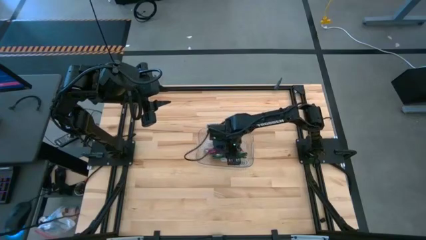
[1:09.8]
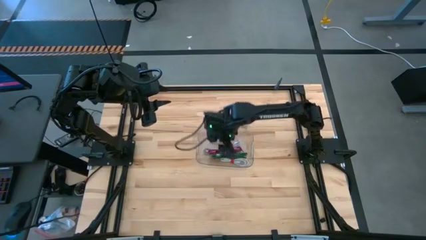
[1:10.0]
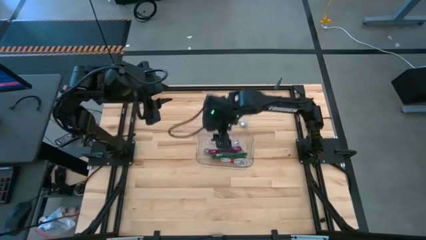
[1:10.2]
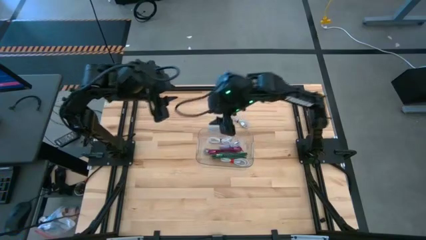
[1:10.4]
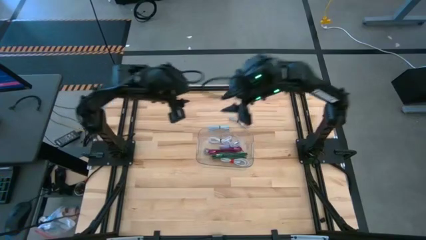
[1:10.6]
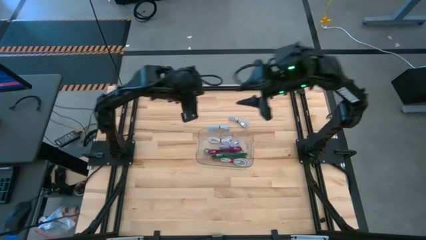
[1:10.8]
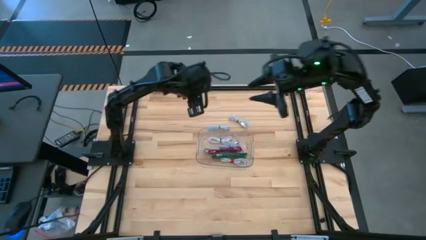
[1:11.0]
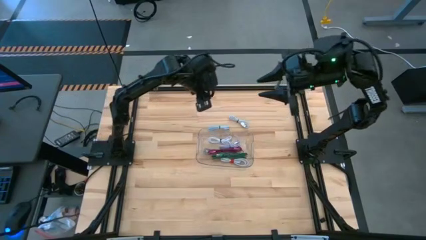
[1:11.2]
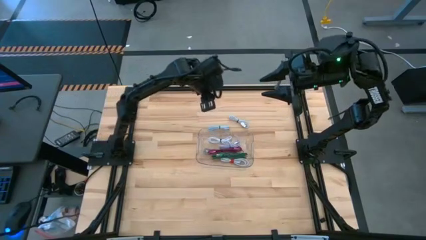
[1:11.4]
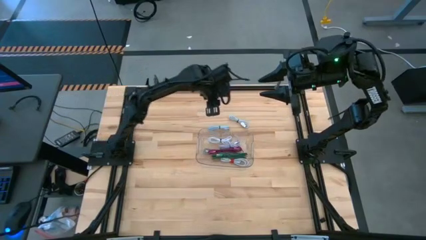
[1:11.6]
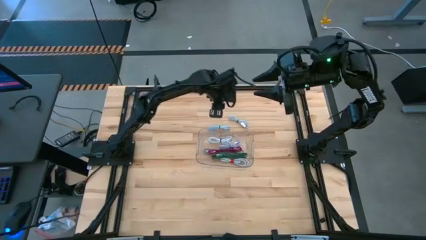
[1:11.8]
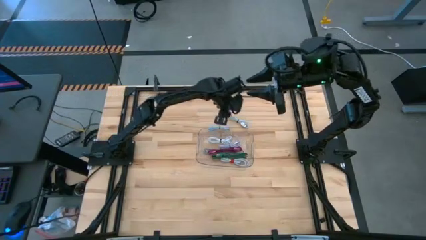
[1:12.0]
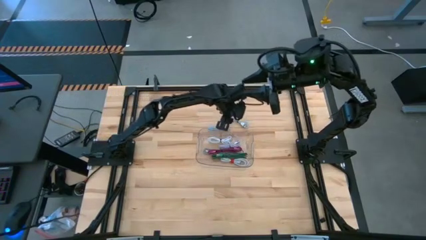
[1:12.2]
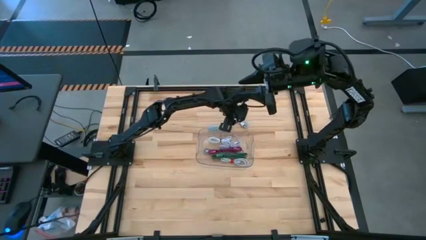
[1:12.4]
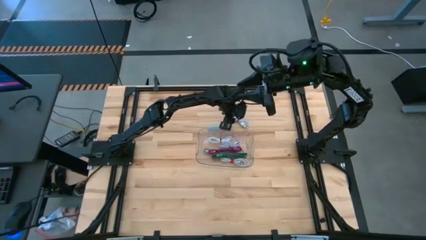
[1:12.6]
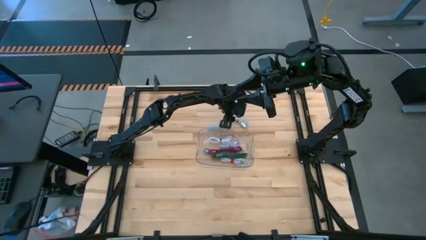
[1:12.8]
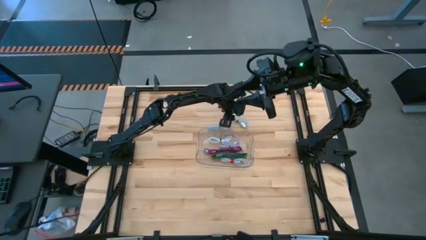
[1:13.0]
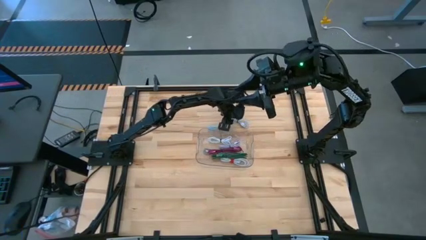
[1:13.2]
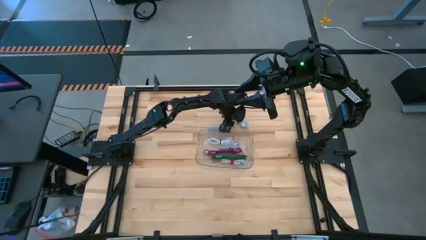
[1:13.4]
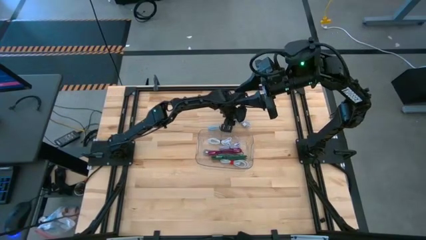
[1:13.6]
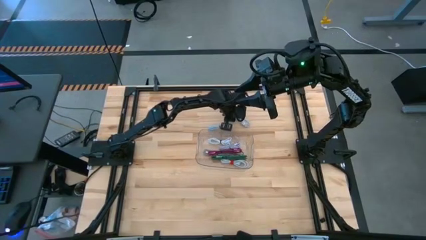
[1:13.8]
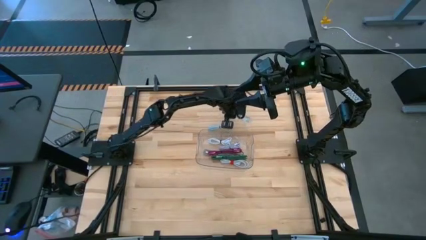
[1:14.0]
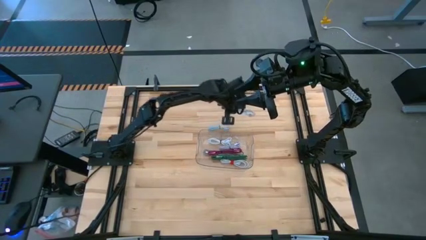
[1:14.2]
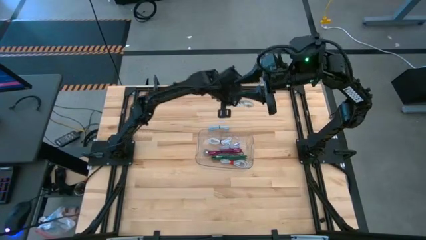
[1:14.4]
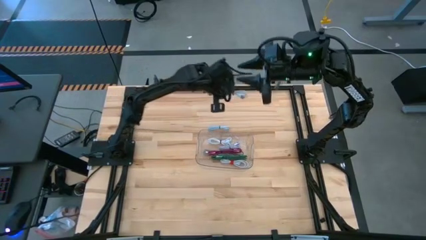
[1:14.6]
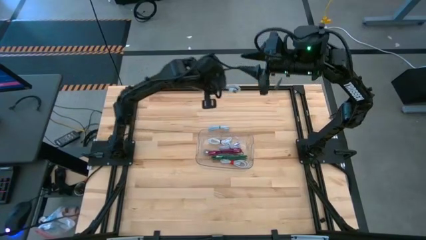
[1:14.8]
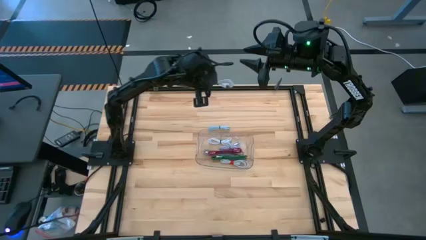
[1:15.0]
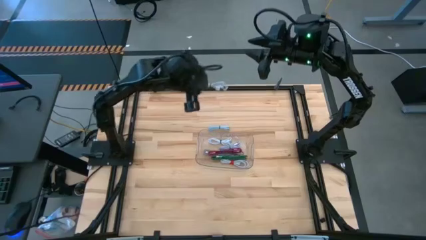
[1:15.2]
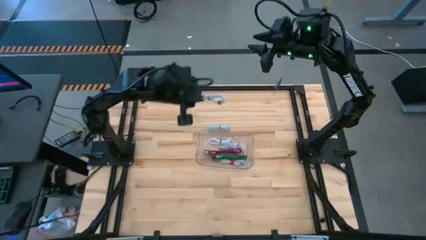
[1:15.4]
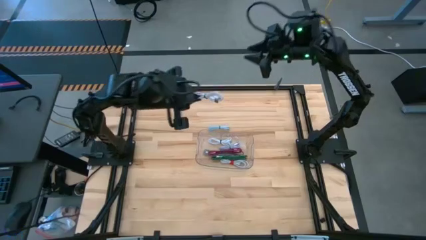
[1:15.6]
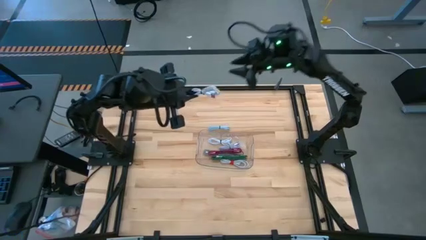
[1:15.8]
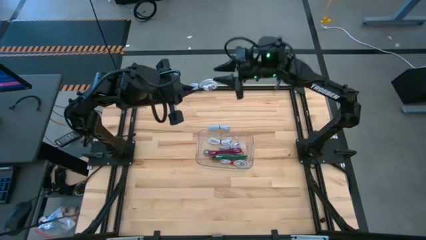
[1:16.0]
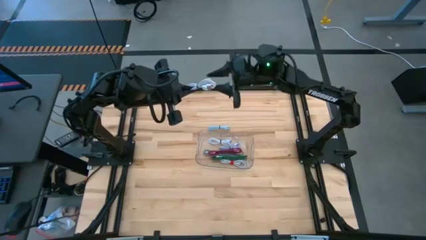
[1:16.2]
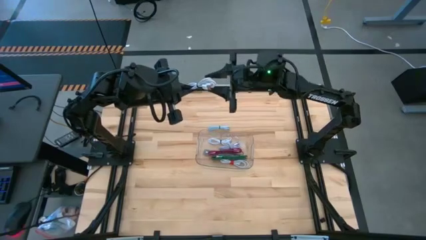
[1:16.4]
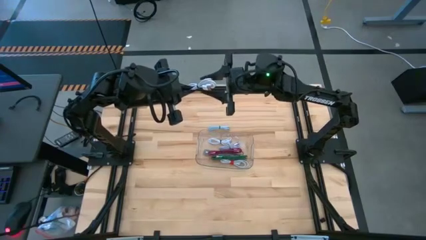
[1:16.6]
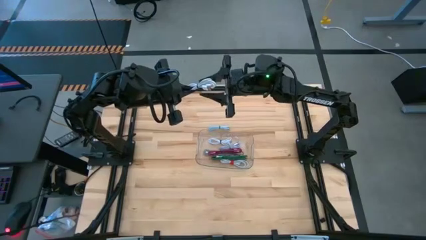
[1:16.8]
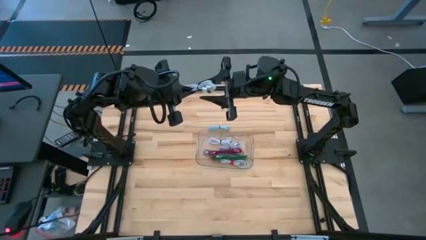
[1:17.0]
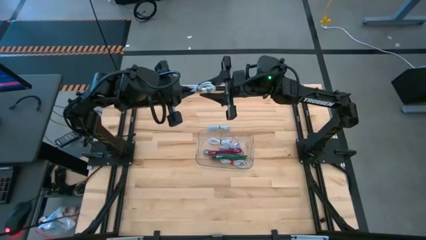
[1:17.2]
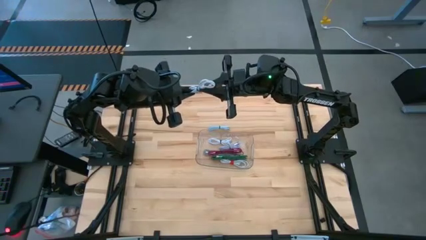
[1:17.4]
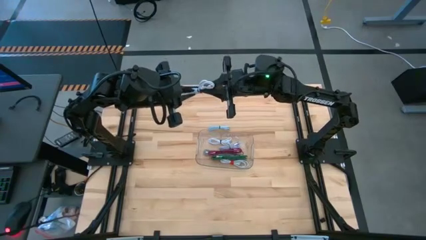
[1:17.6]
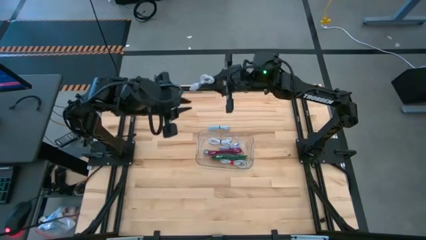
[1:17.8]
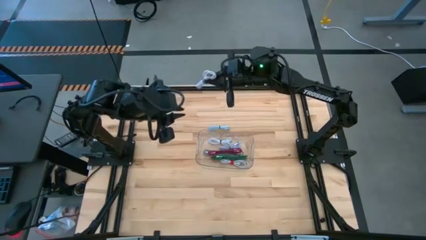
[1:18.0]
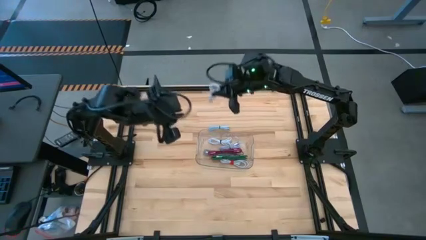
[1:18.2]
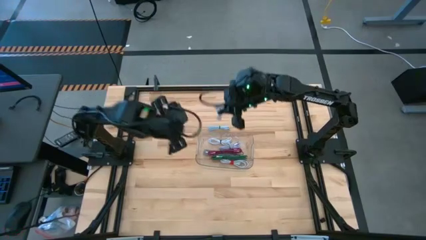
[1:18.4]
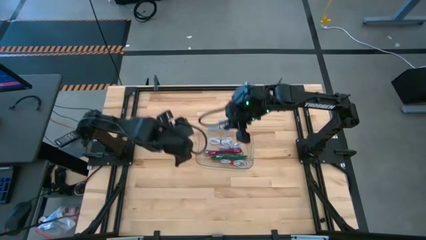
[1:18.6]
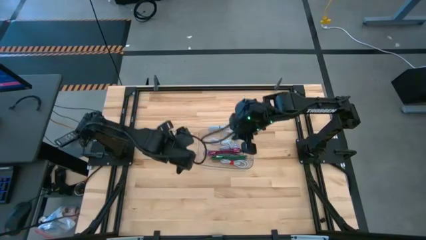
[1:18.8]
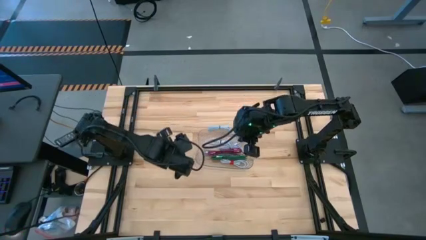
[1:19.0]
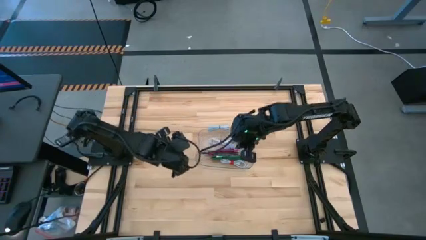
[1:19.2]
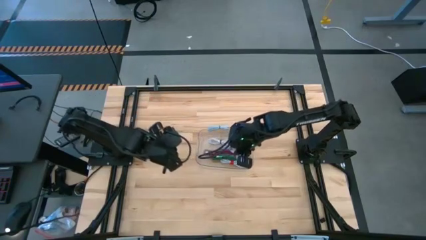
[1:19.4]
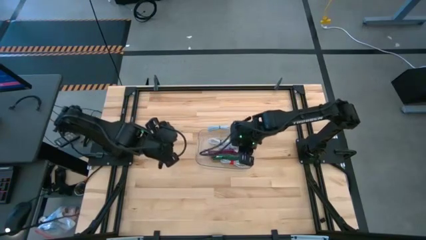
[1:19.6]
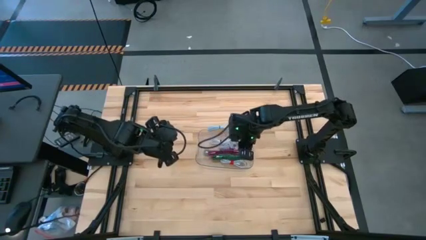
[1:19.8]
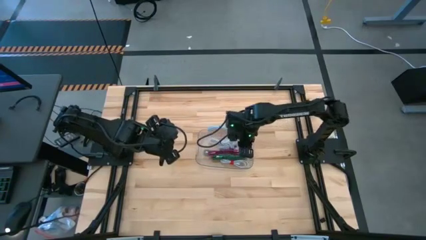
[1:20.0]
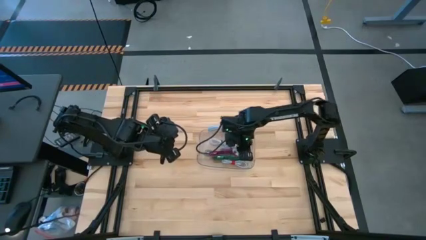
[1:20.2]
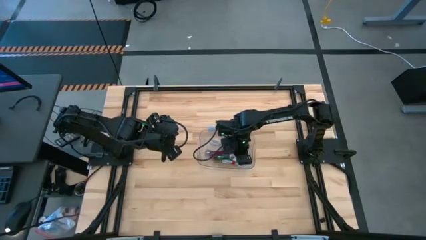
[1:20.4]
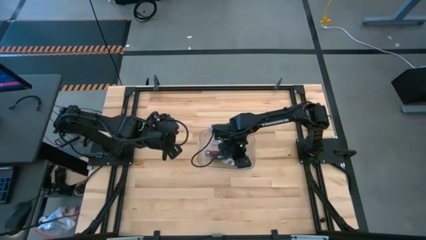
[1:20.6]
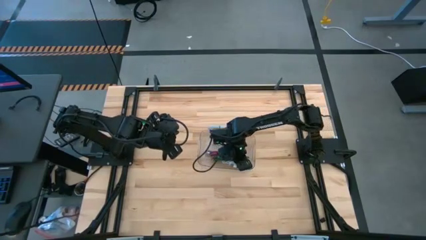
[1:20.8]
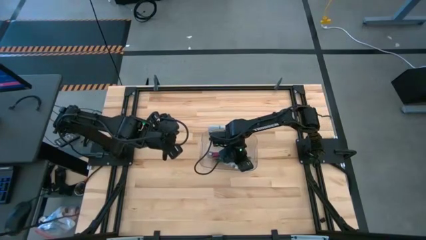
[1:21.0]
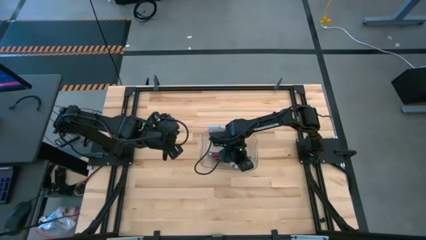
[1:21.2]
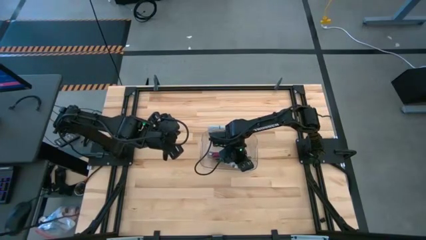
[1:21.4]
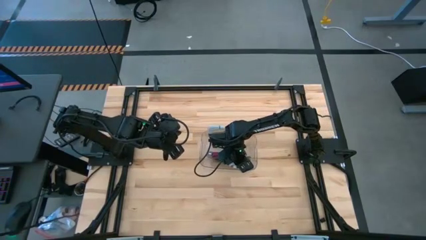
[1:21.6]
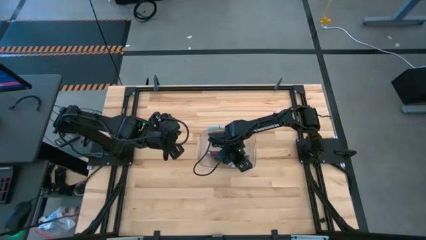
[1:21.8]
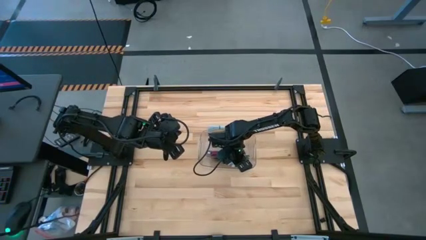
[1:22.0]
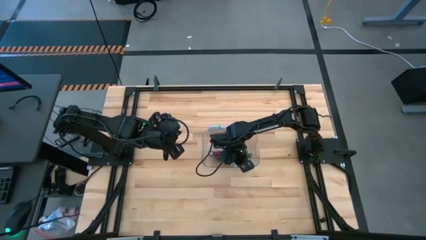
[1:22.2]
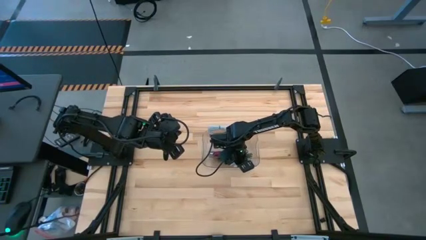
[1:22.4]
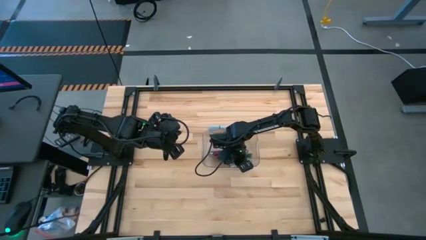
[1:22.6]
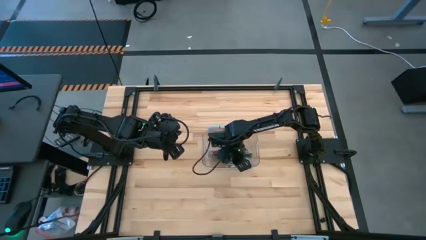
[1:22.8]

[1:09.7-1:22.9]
Task: Pick and place USB-C Cables
Put the light blue charger cable into the transparent bin
